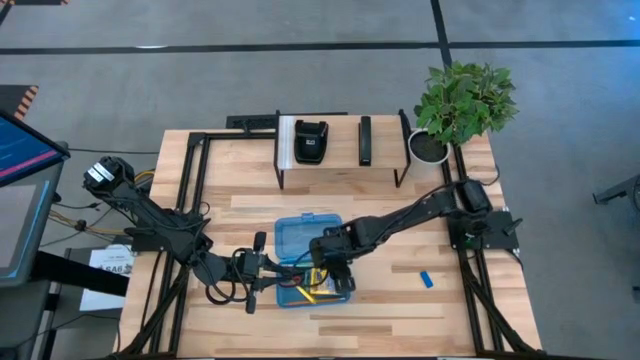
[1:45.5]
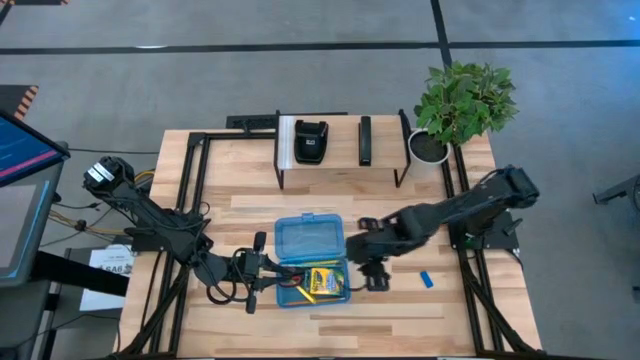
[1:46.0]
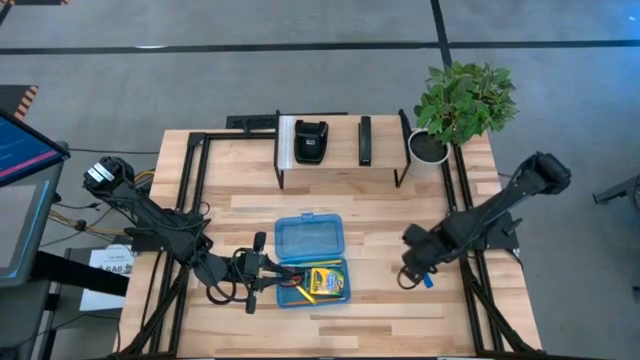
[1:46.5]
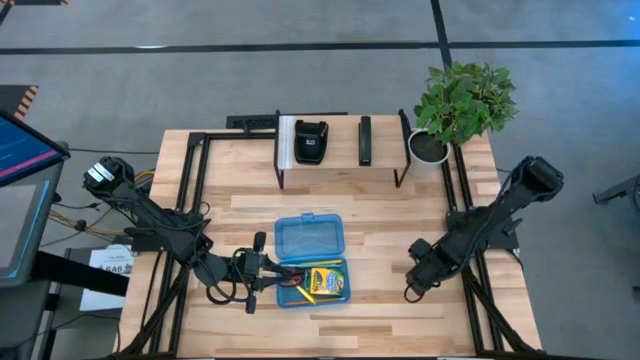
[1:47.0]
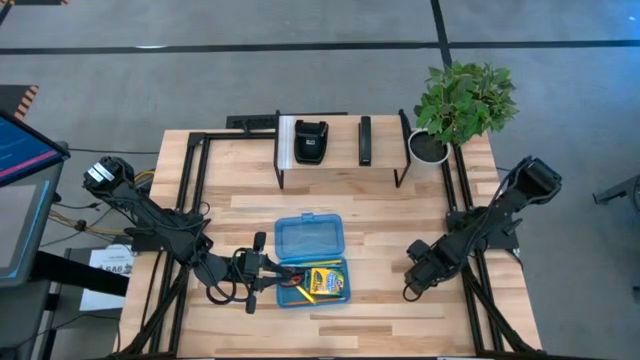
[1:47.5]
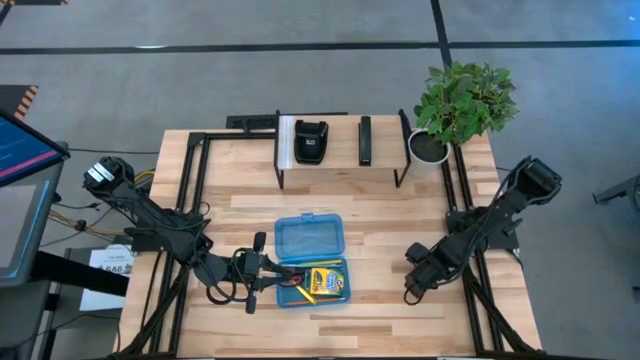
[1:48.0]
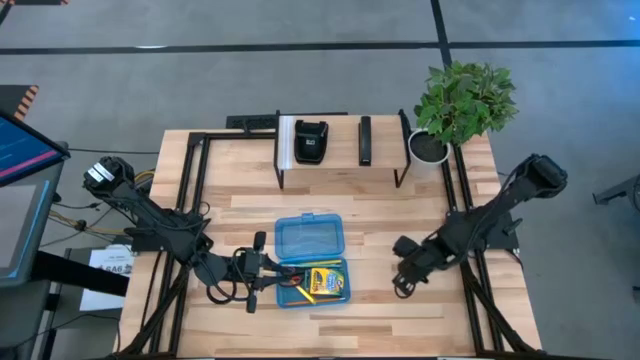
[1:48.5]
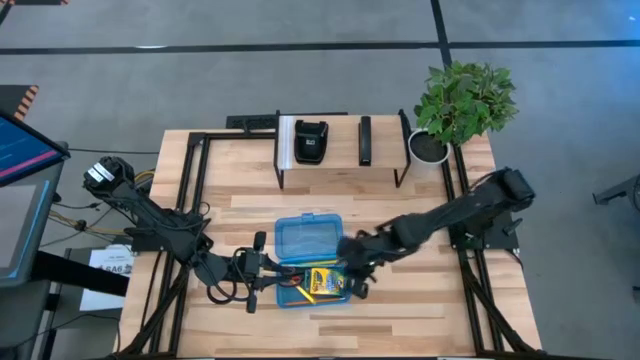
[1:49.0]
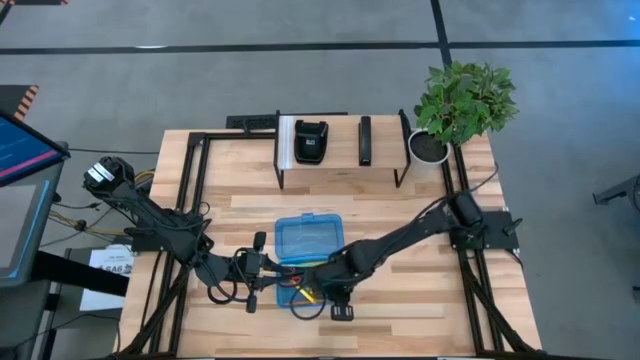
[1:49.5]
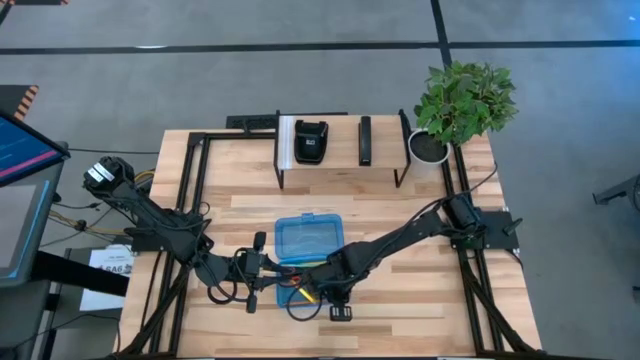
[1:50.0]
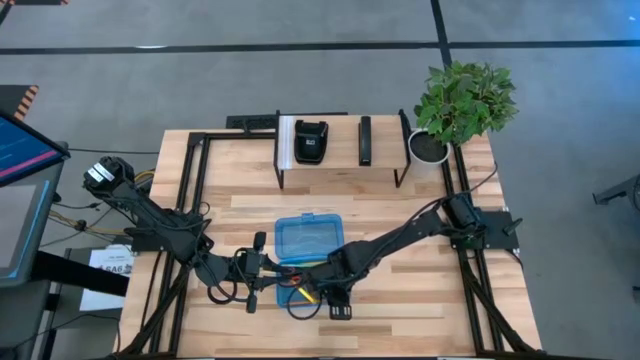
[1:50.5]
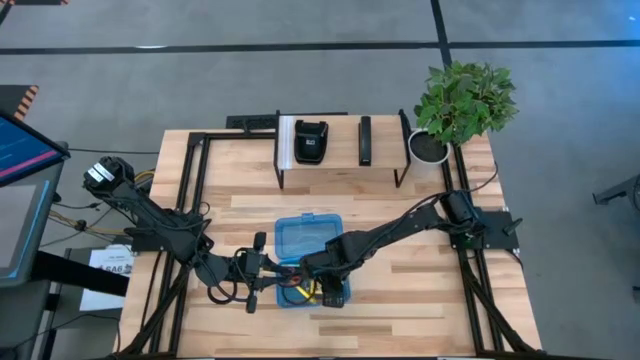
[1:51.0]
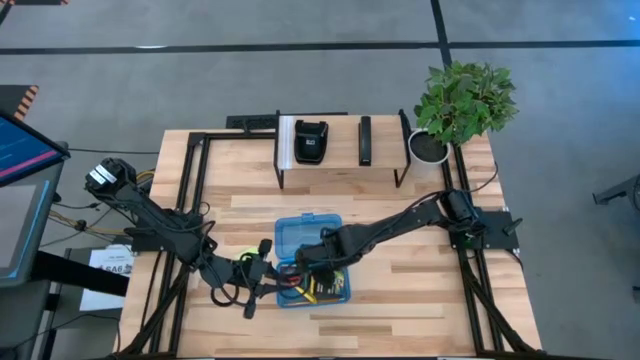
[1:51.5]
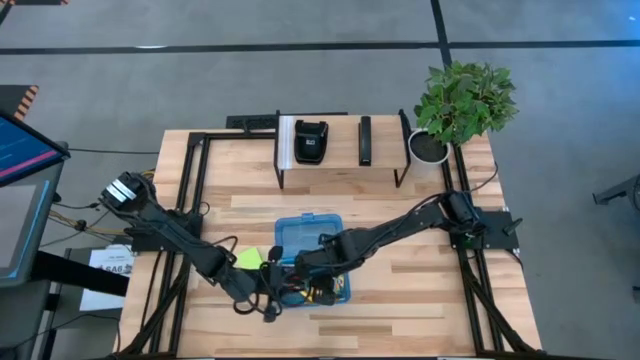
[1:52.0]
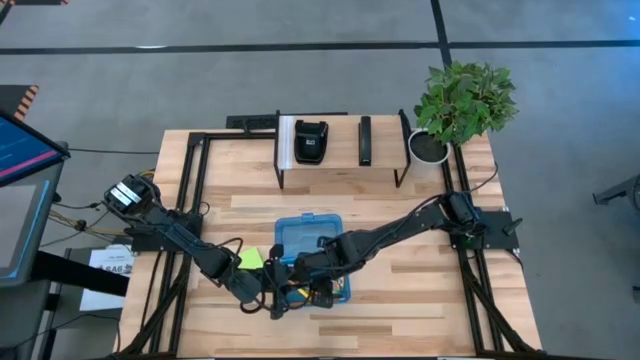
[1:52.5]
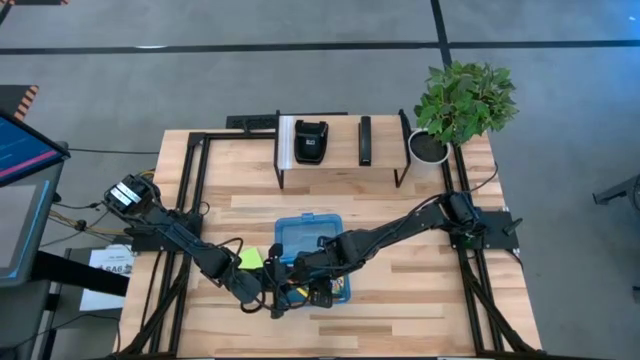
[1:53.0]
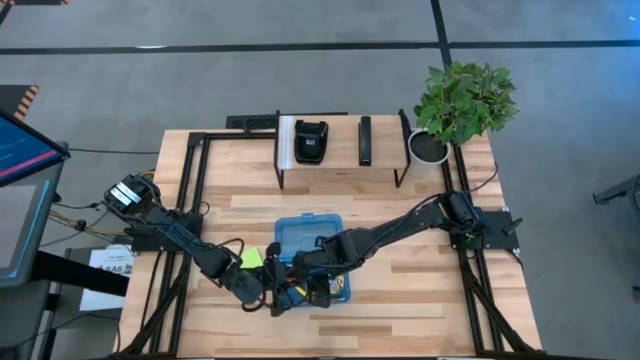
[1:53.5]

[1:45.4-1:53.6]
Task: Pack school essentials
Put the blue eraser into the blue supply box

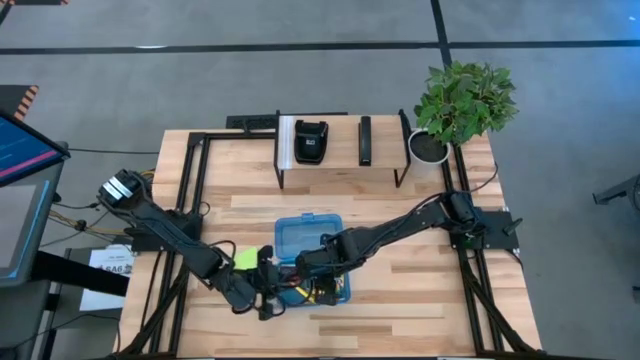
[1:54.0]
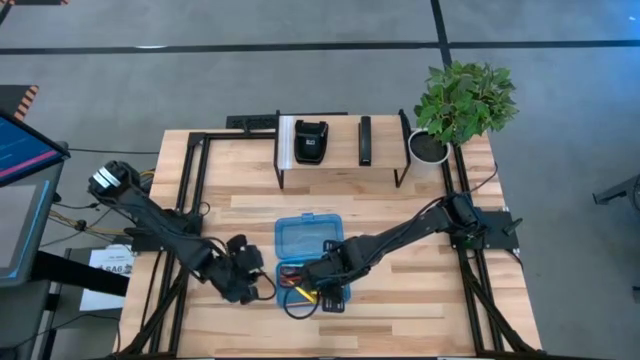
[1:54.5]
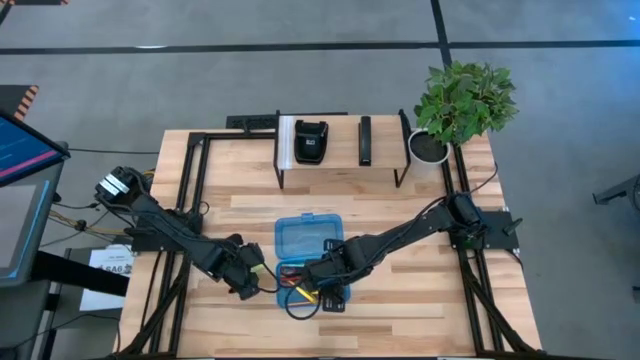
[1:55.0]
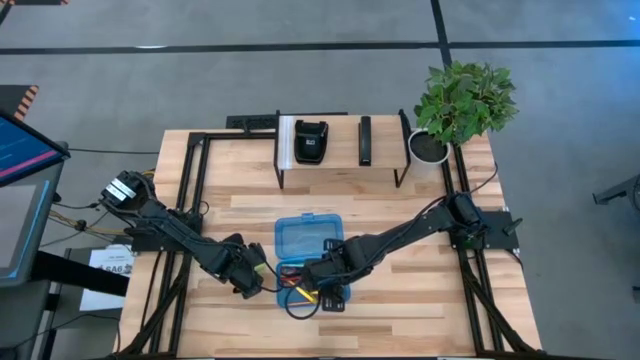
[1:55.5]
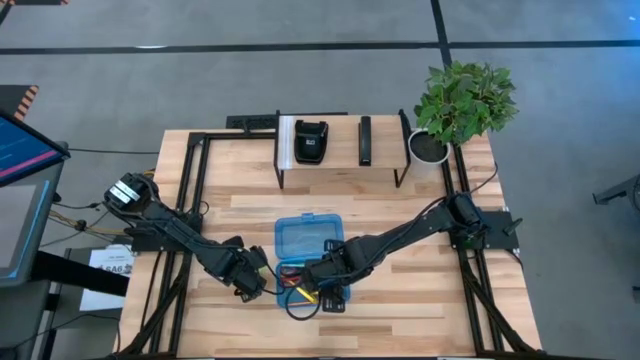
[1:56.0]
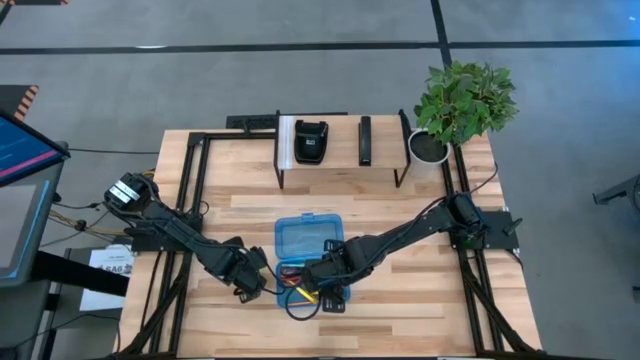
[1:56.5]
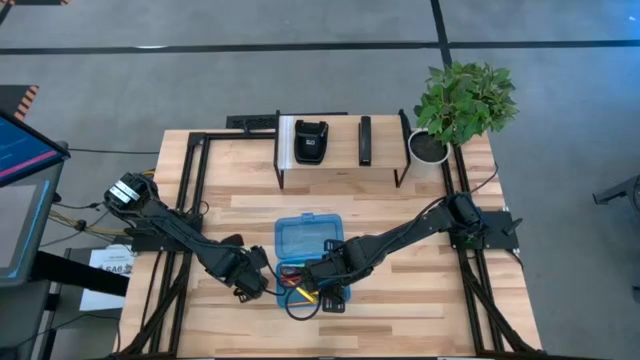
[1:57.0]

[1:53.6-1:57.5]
Put the green sticky note into the blue supply box

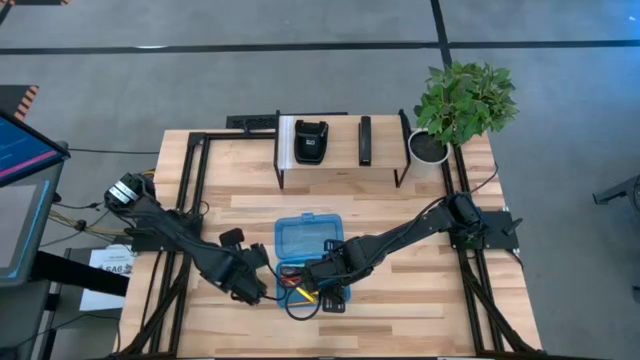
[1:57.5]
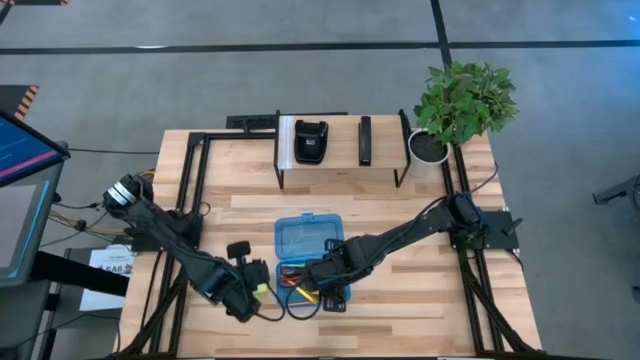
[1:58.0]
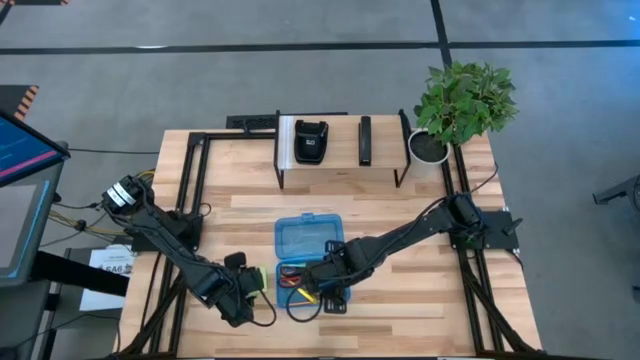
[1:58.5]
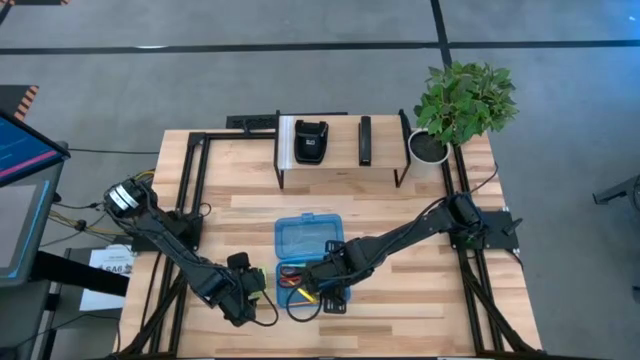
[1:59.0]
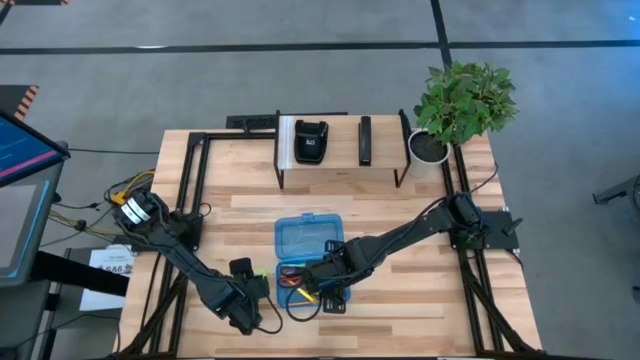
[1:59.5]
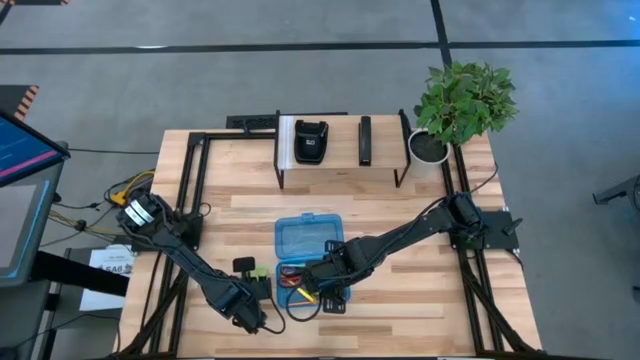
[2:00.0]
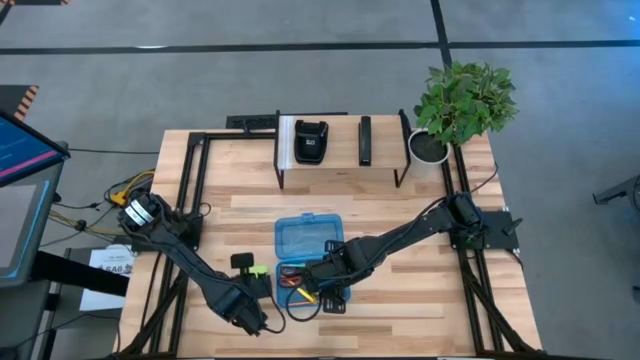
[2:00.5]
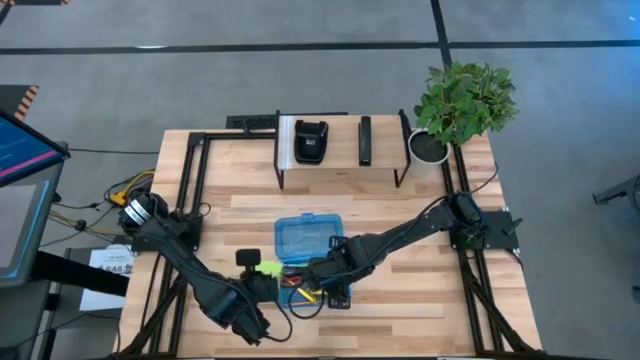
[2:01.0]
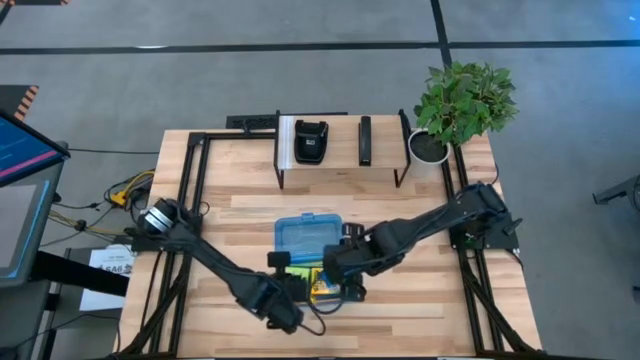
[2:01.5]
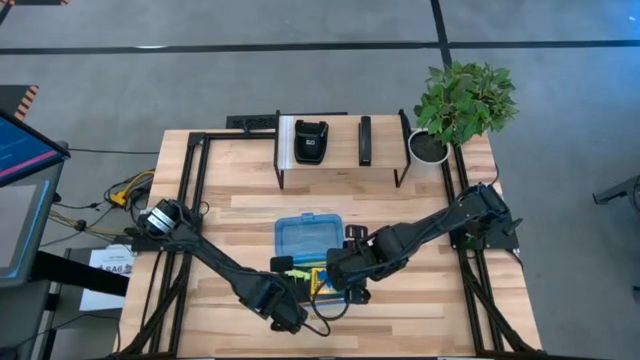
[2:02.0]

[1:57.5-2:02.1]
Put the green sticky note into the blue supply box

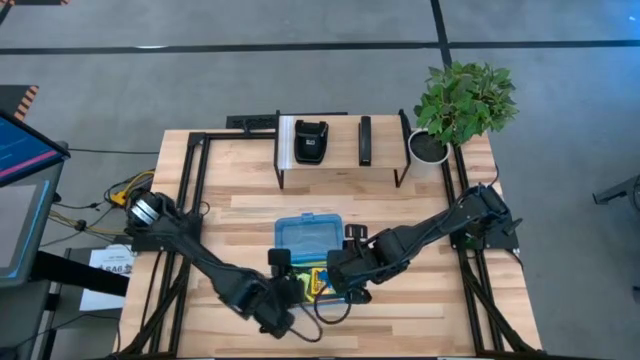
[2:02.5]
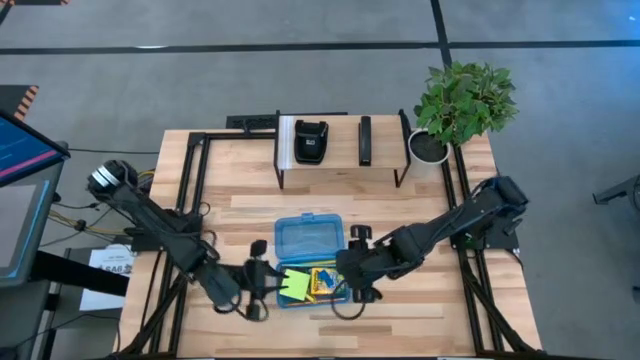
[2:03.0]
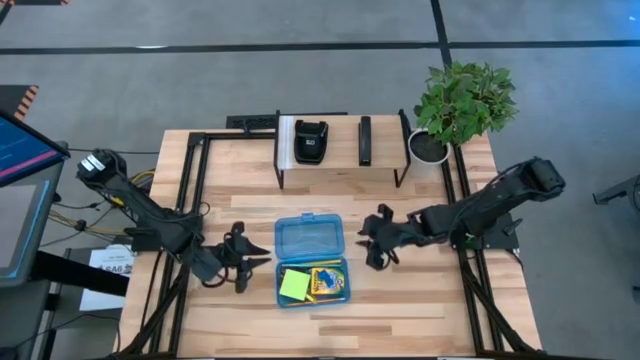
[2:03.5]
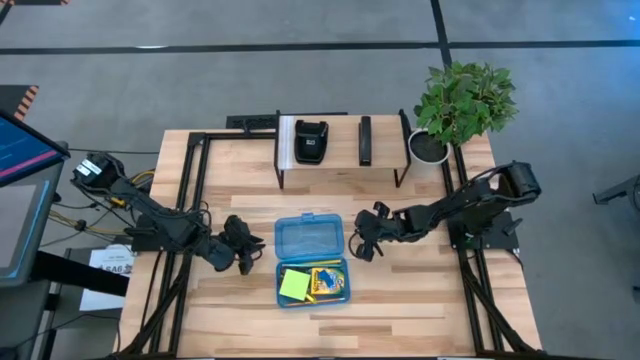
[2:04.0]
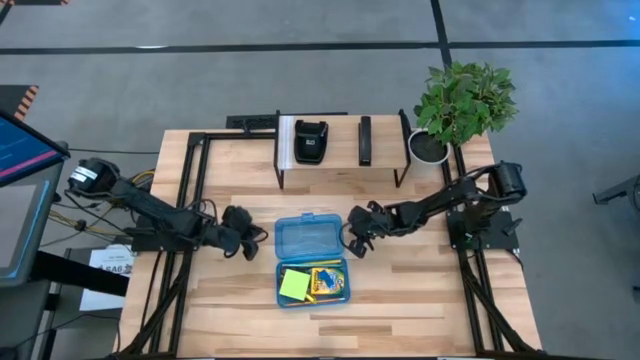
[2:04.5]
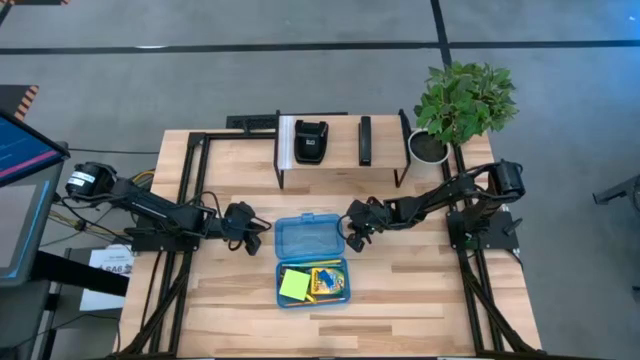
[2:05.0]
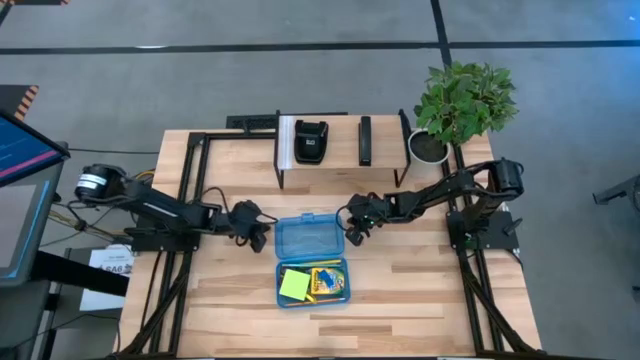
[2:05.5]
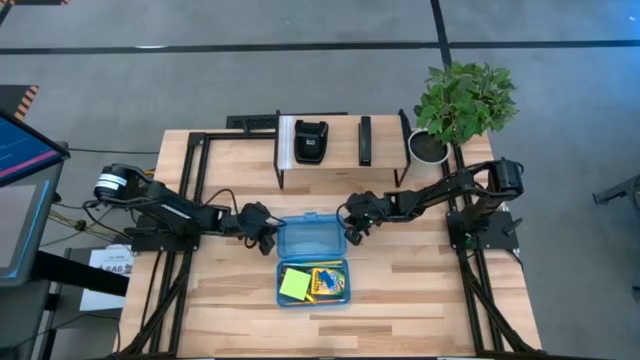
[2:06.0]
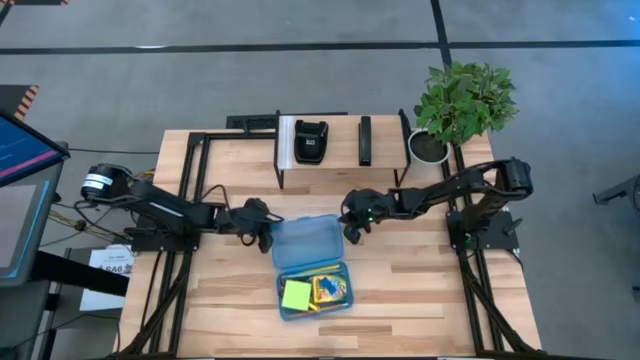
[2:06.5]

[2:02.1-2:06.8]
Close the blue supply box
